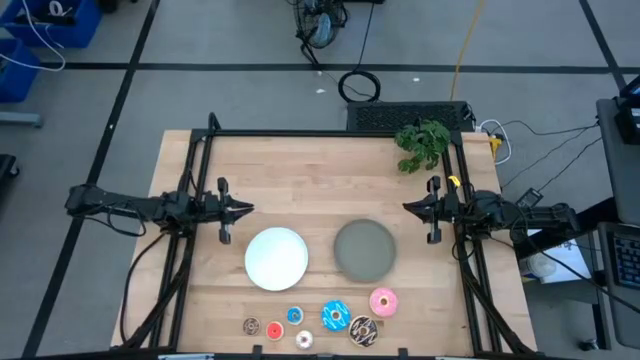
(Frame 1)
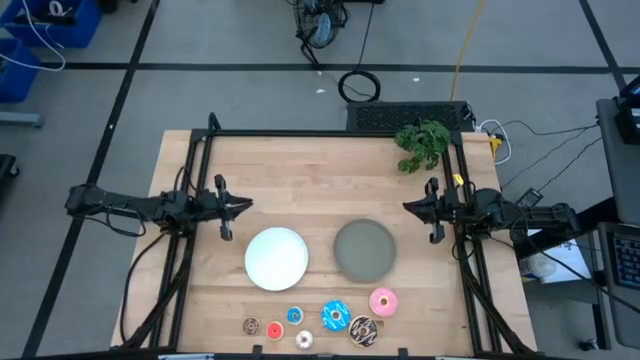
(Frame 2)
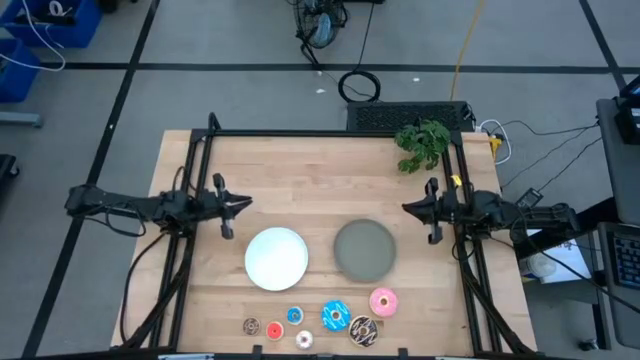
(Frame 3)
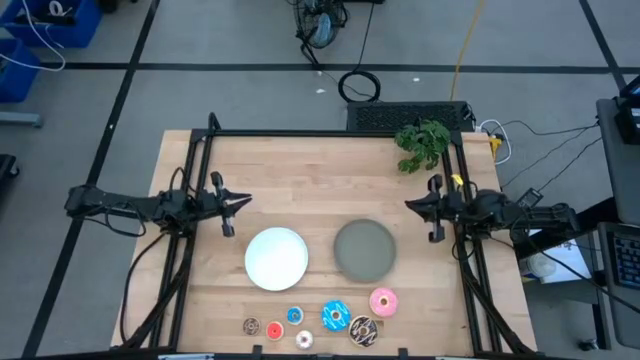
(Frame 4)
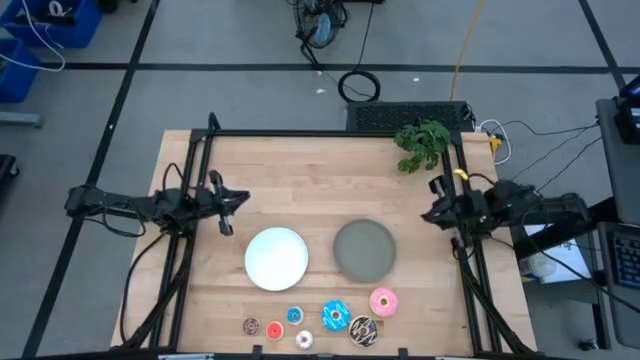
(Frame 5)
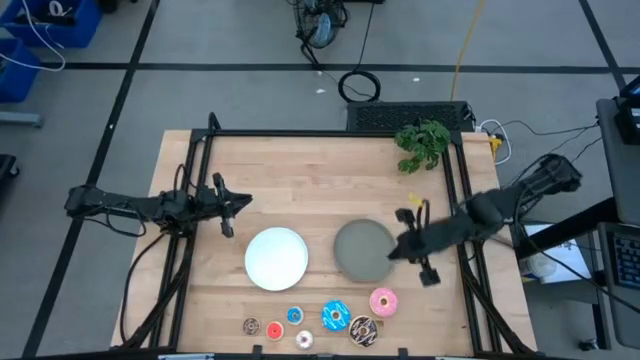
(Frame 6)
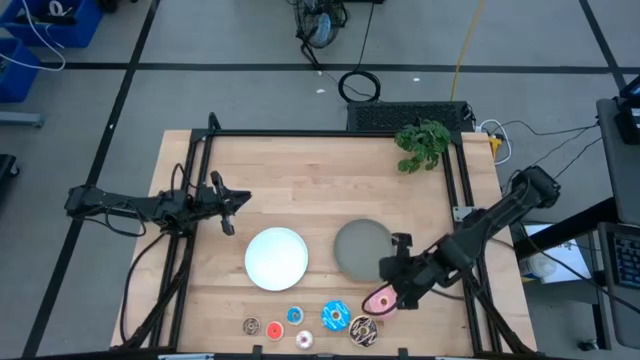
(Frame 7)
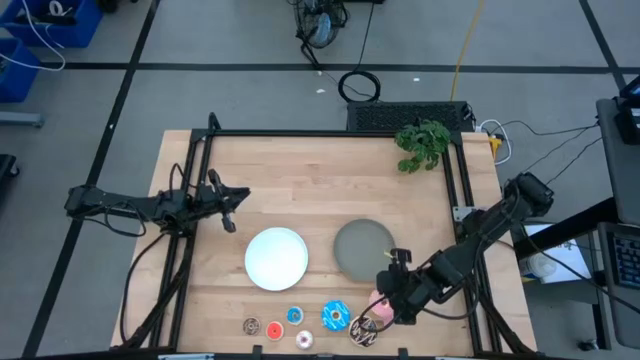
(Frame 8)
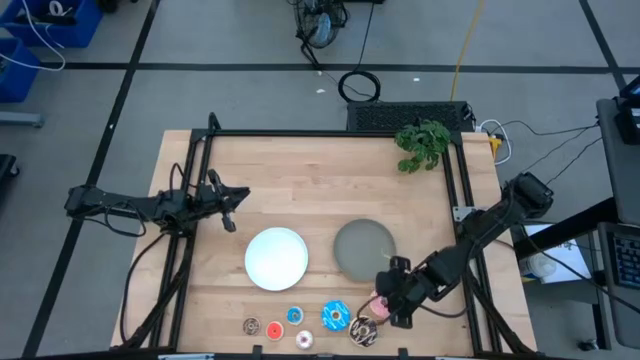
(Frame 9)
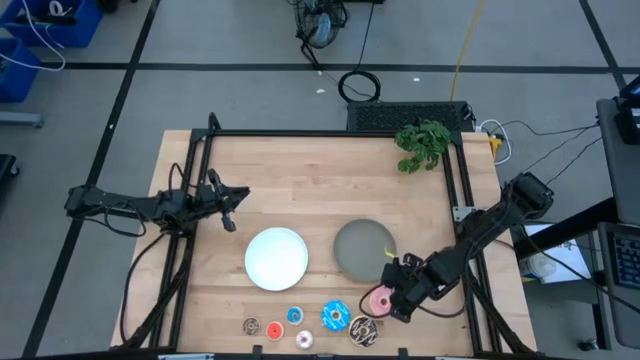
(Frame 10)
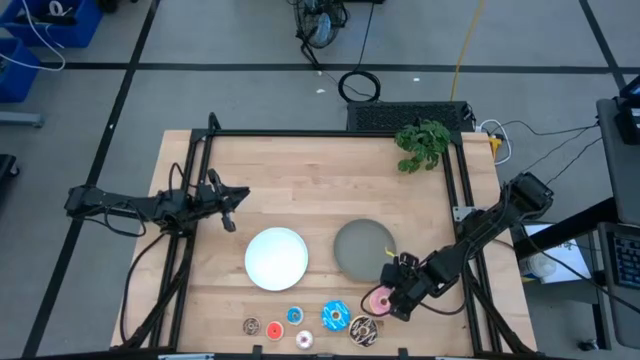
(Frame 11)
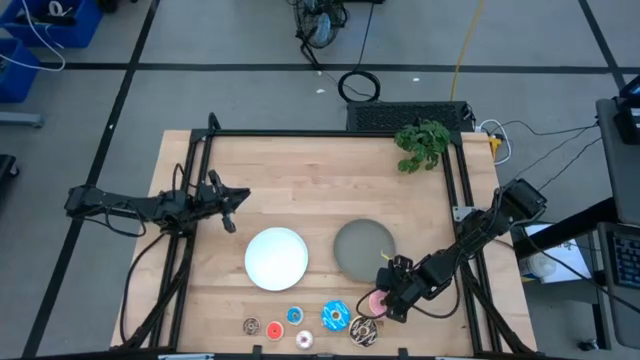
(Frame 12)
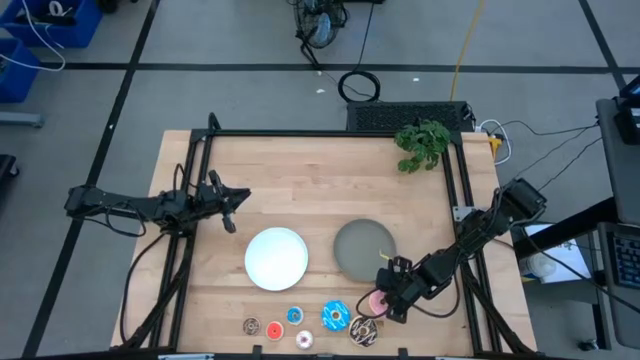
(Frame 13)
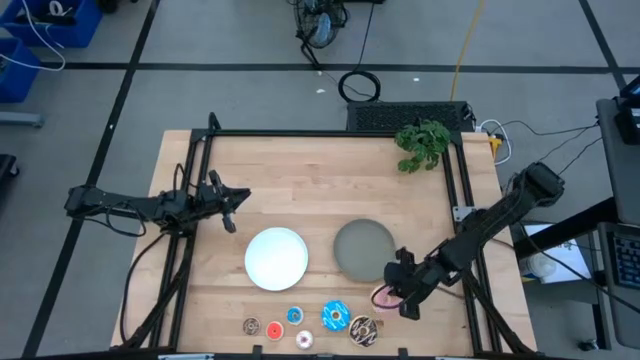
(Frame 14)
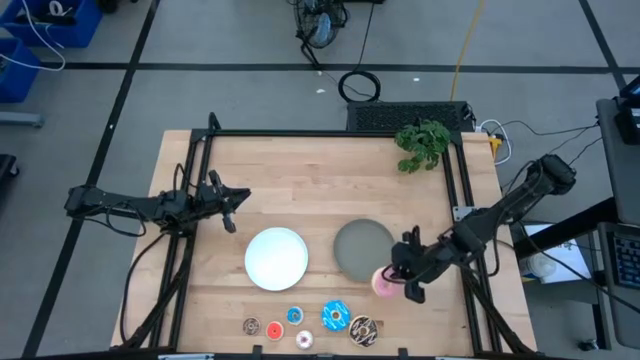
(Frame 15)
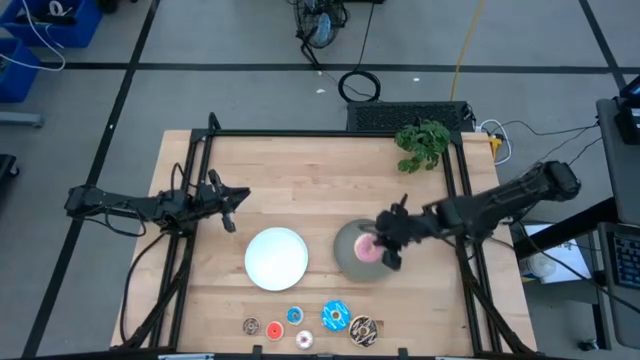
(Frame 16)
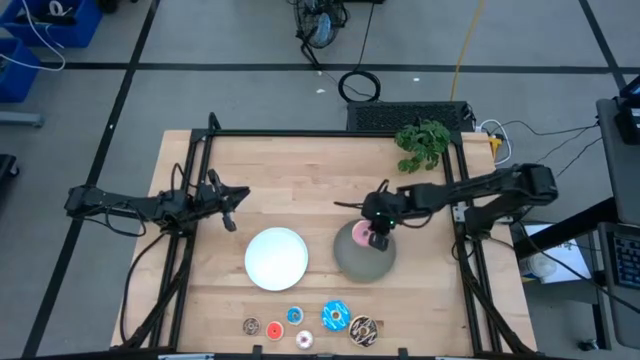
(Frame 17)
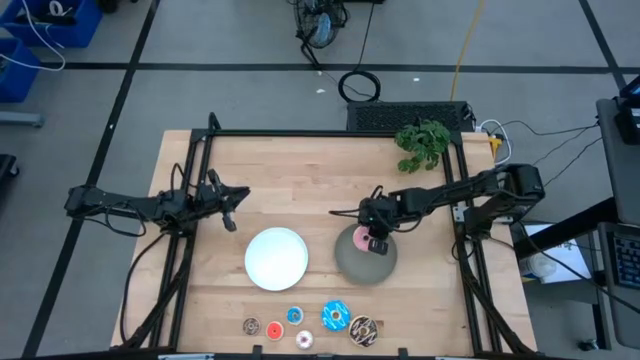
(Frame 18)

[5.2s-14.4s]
Task: Pick & Place donuts
Put the big pink donut on the gray plate

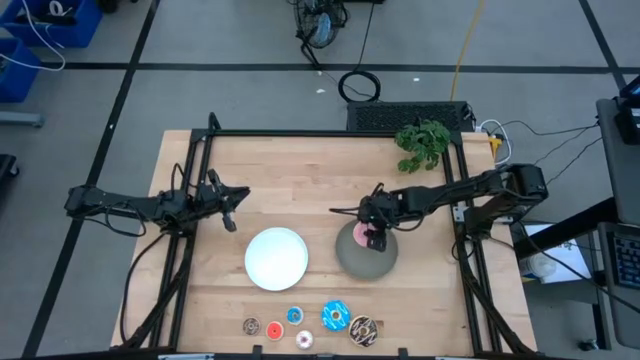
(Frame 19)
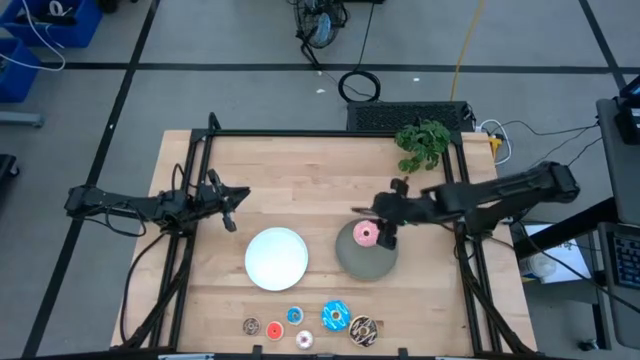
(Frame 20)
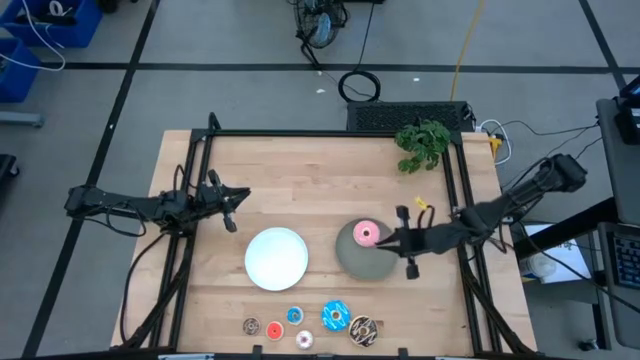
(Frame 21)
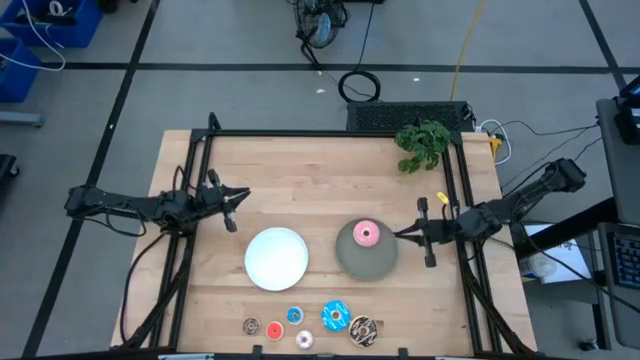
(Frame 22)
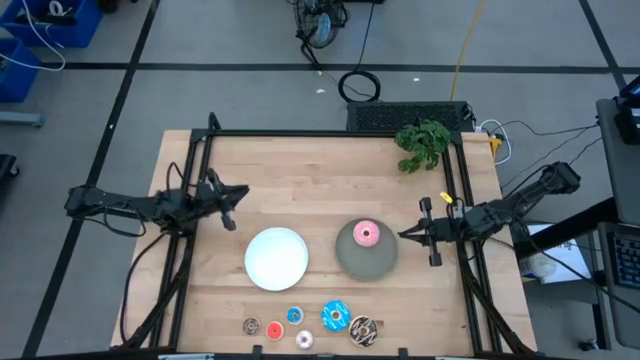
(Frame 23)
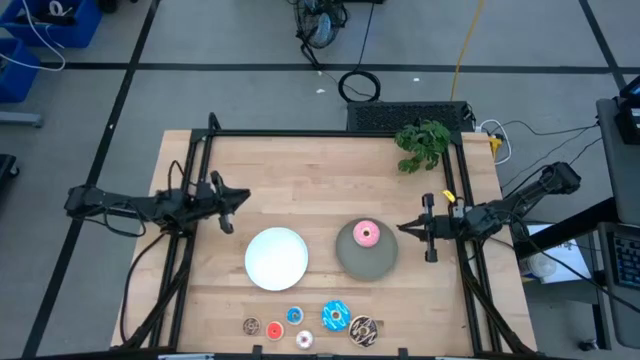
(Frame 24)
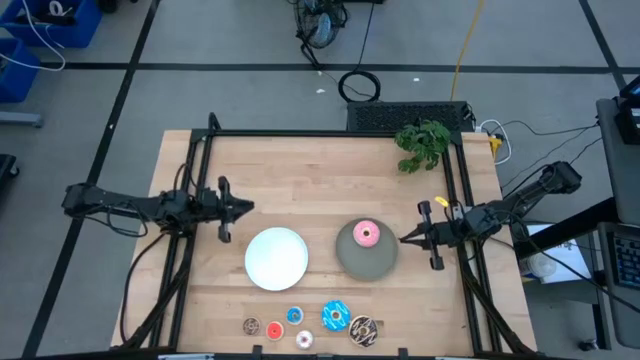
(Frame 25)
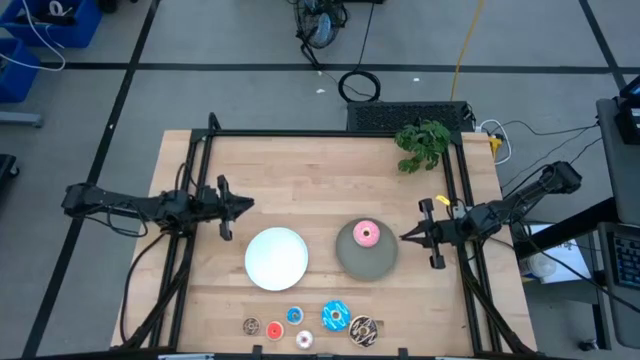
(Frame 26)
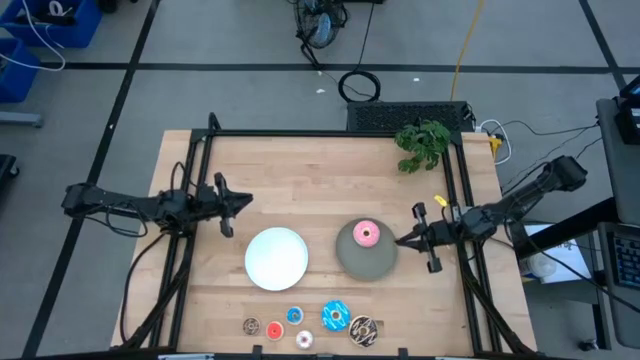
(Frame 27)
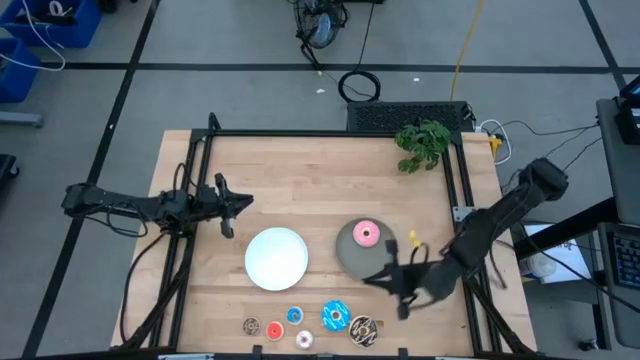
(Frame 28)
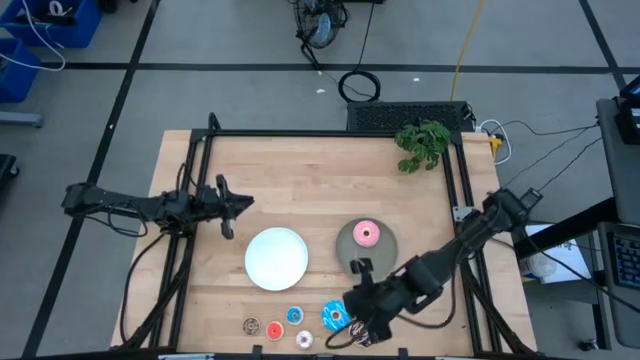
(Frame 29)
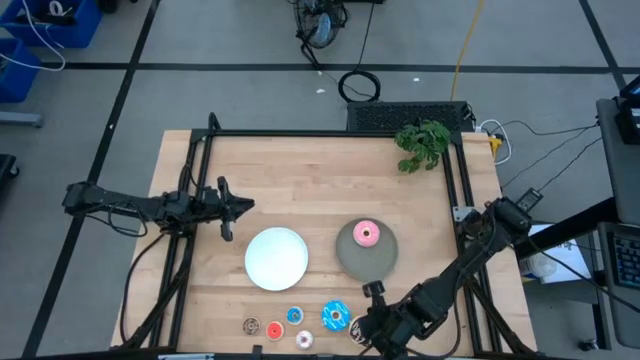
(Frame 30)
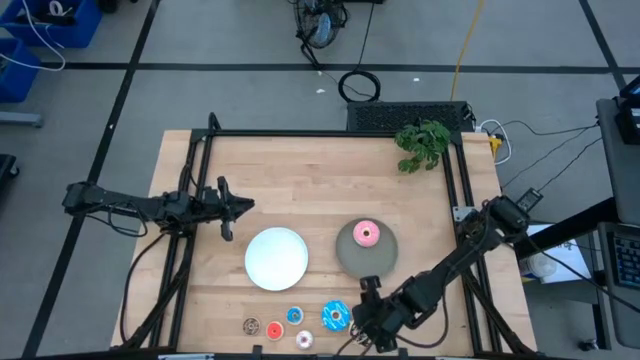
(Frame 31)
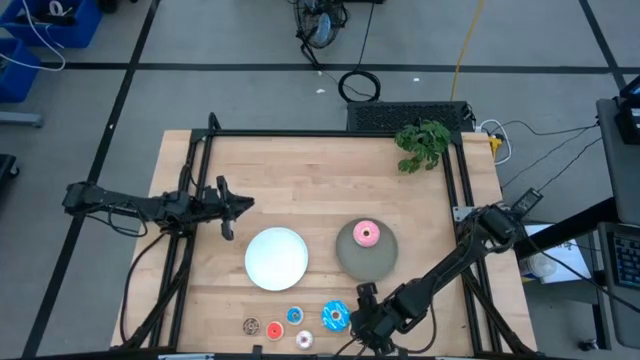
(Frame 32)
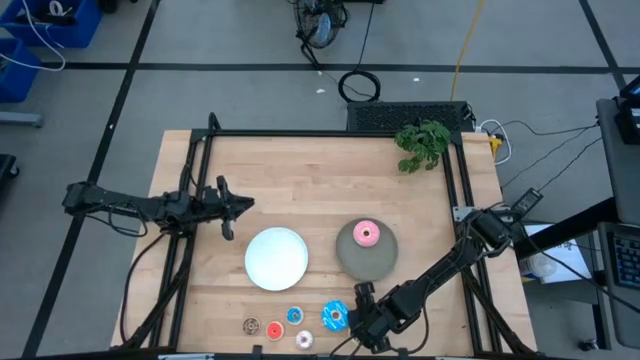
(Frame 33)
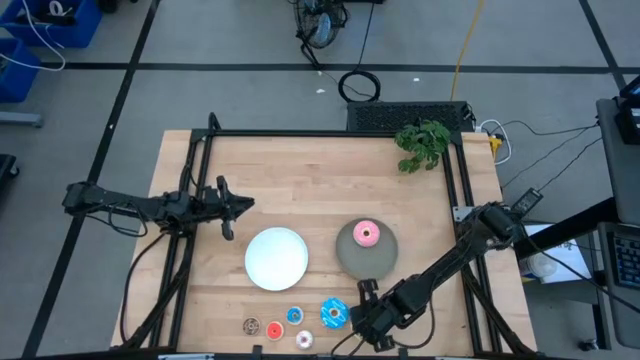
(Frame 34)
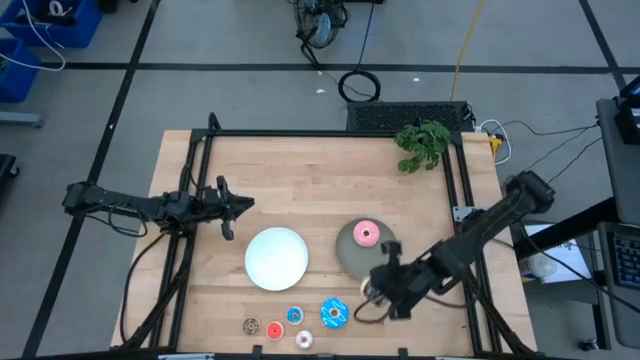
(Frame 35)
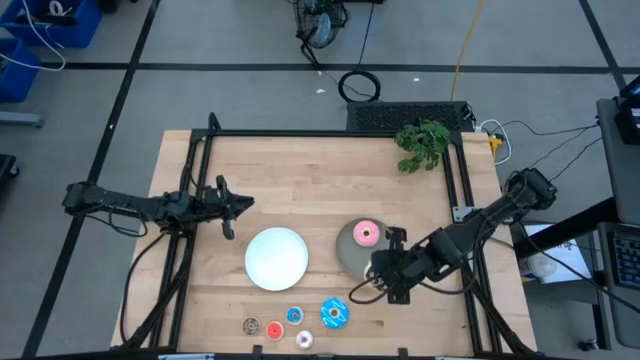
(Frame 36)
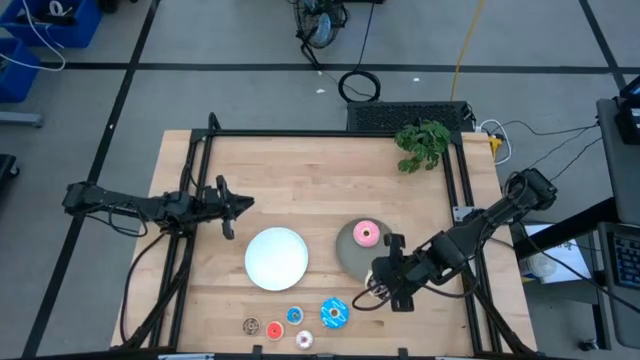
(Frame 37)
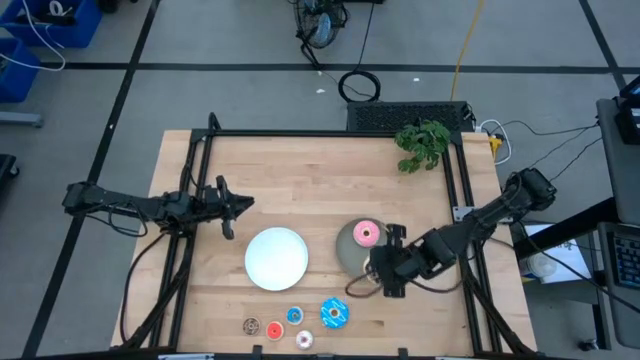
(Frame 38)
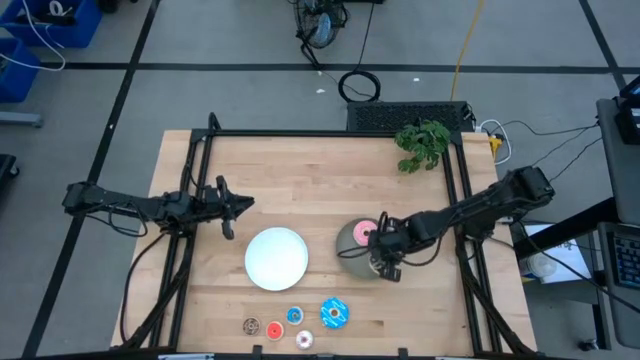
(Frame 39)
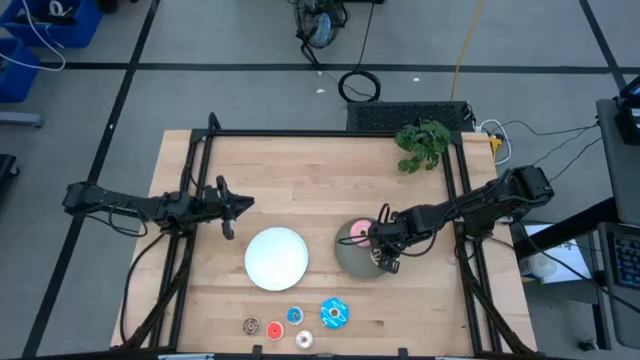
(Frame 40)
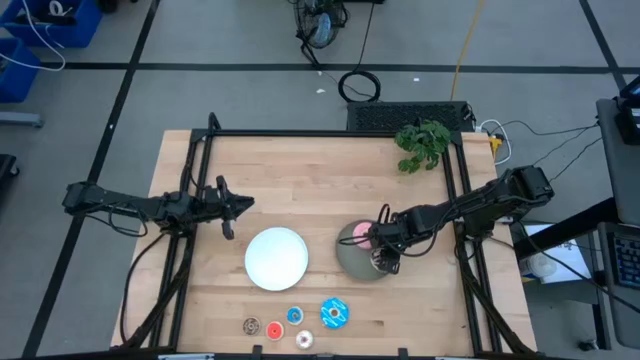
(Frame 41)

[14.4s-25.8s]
Put the big black donut on the gray plate
